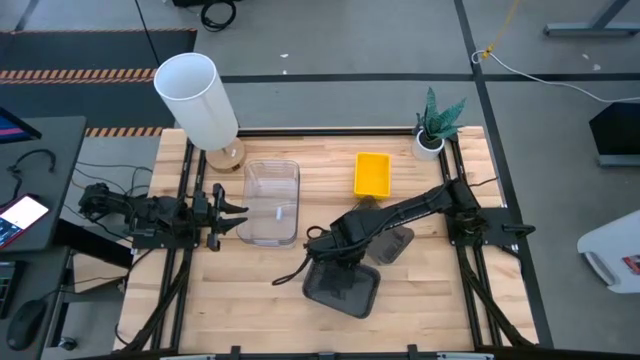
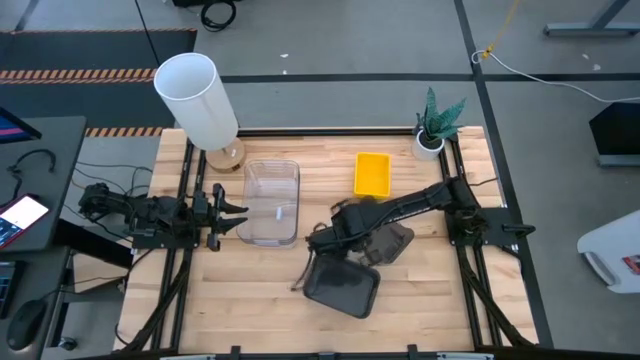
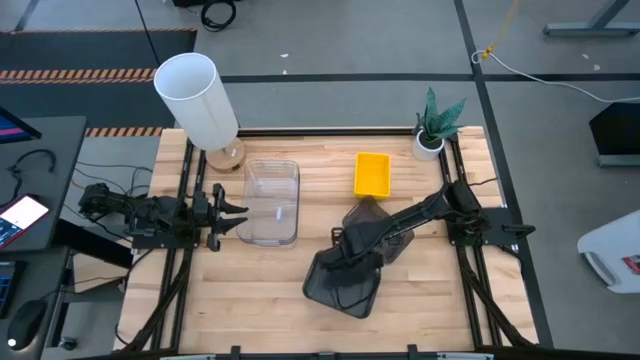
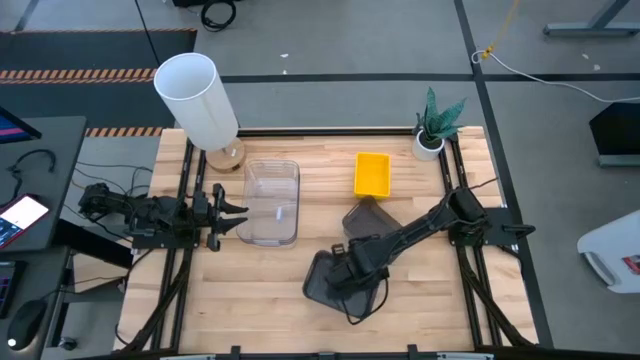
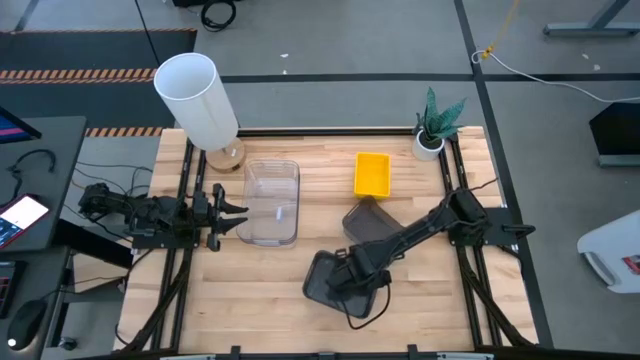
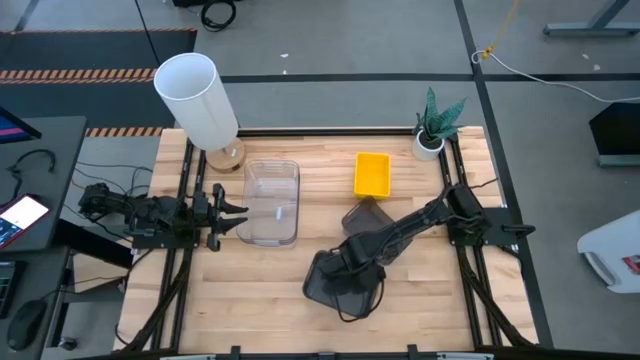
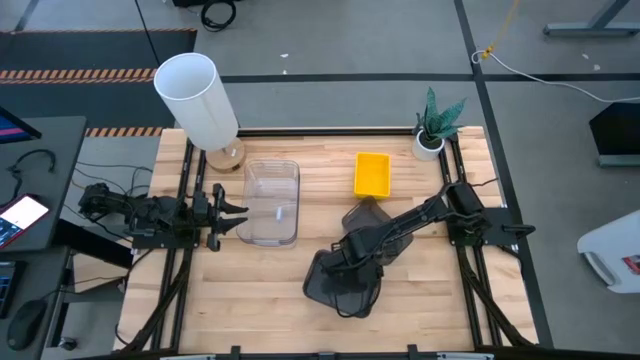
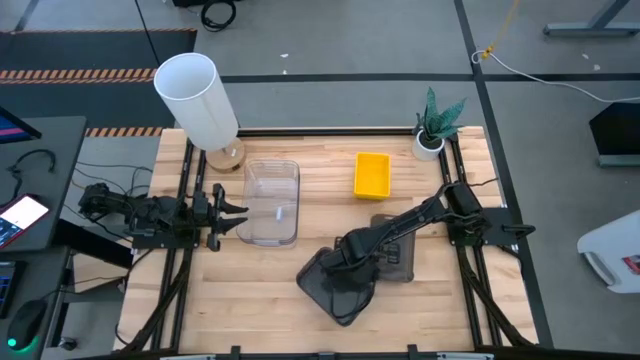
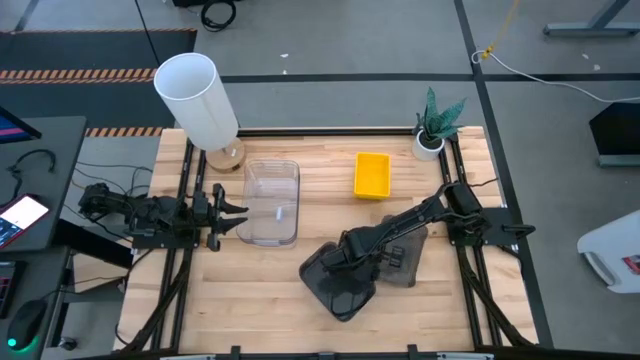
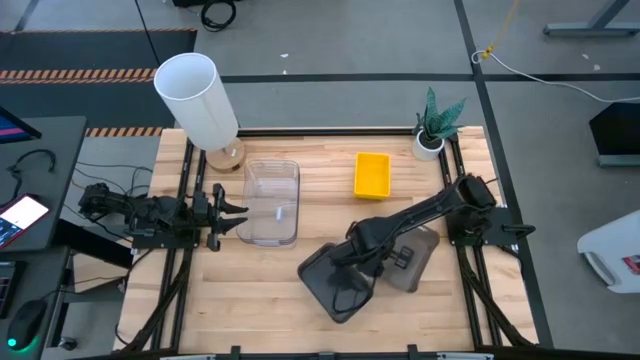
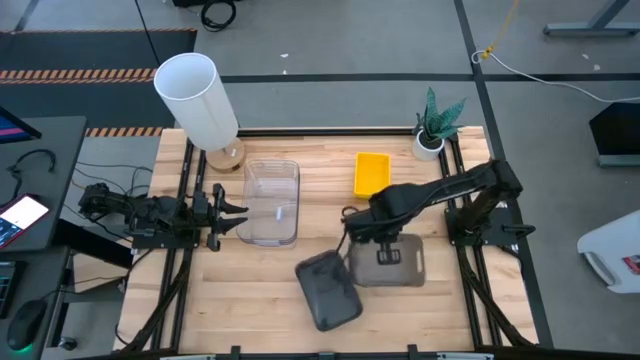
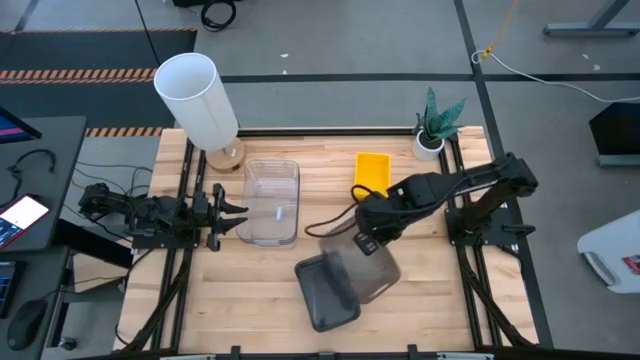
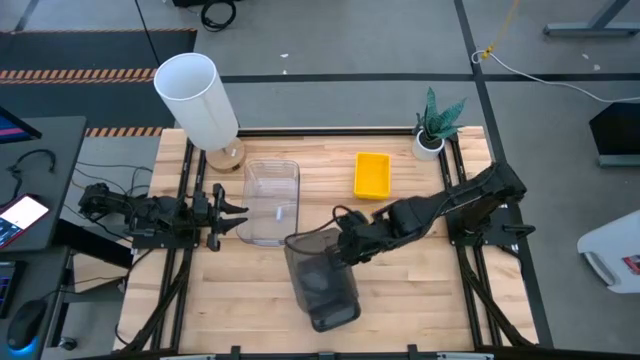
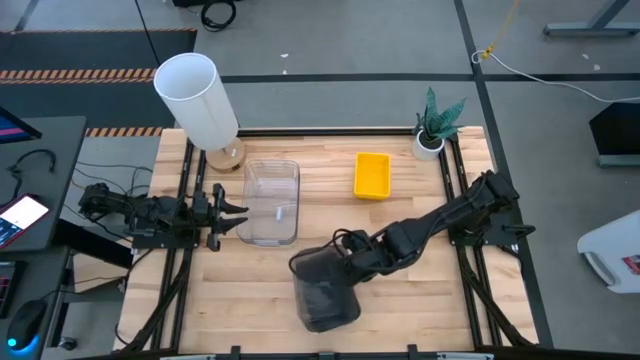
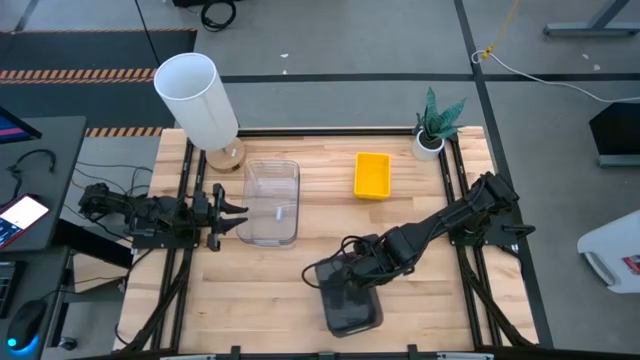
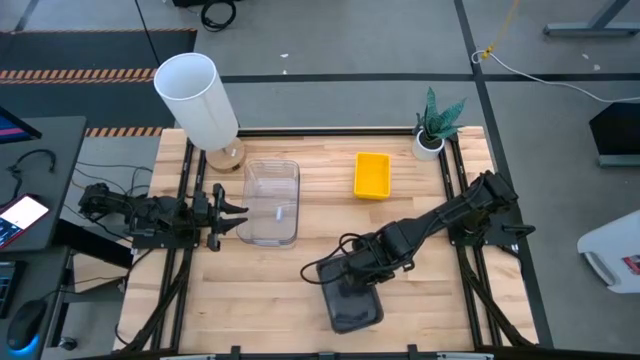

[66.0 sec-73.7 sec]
Stack the top black bin on the bottom black bin

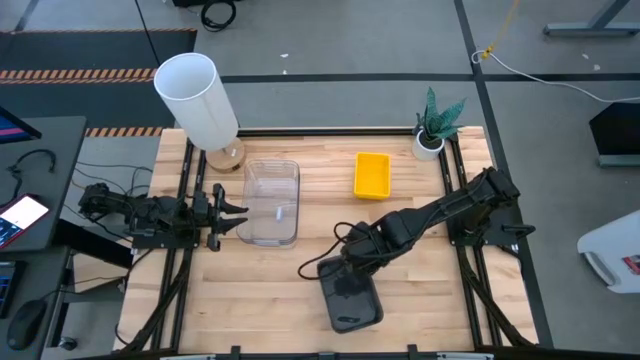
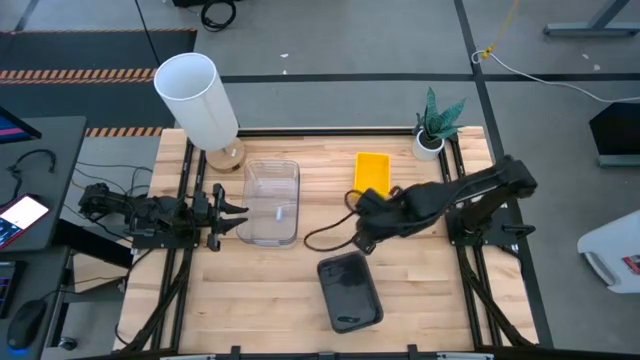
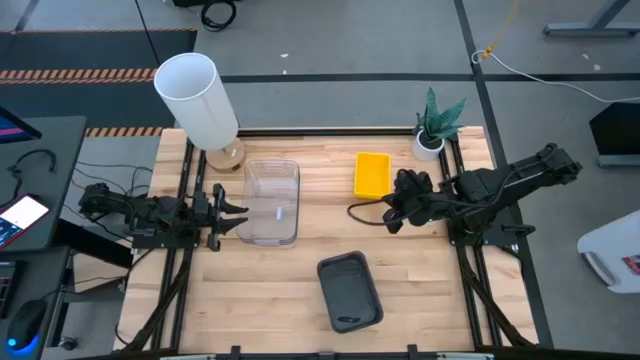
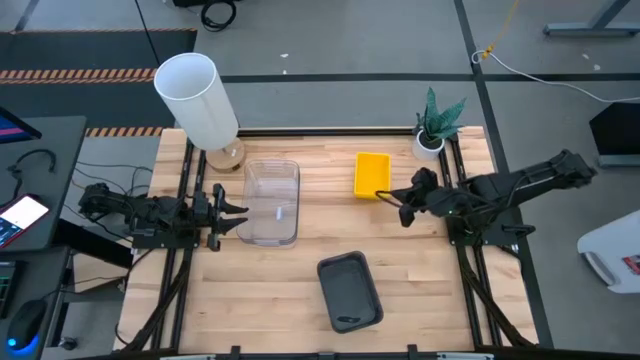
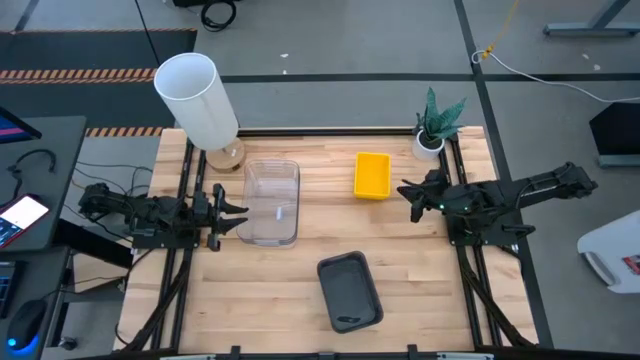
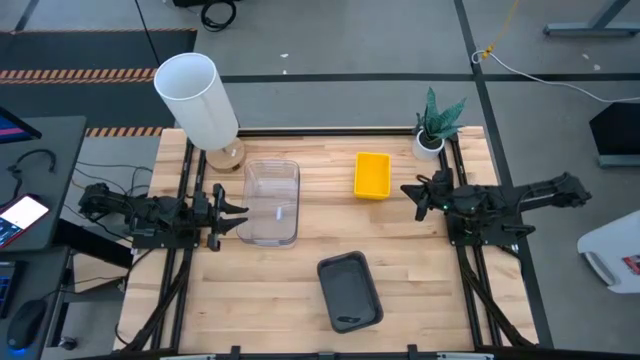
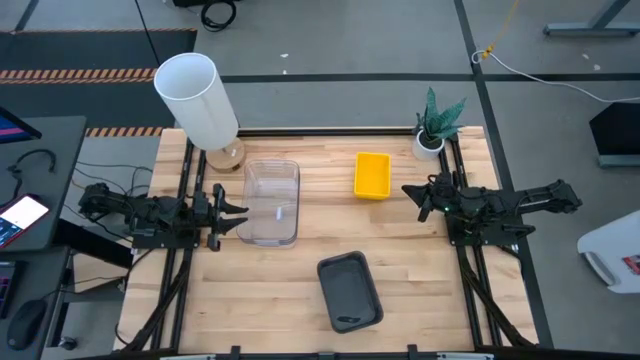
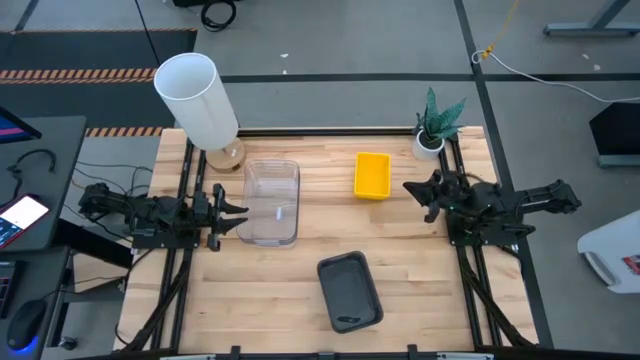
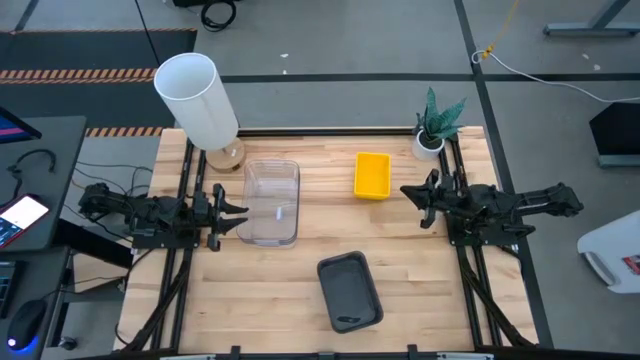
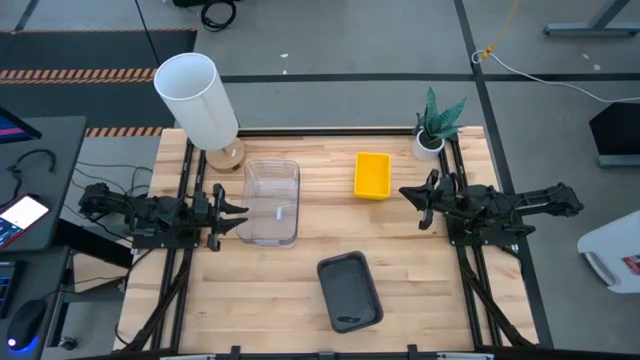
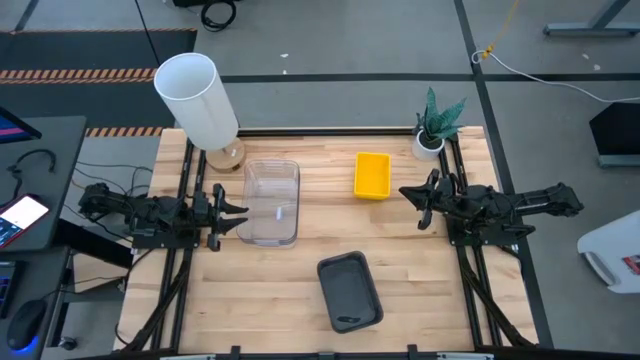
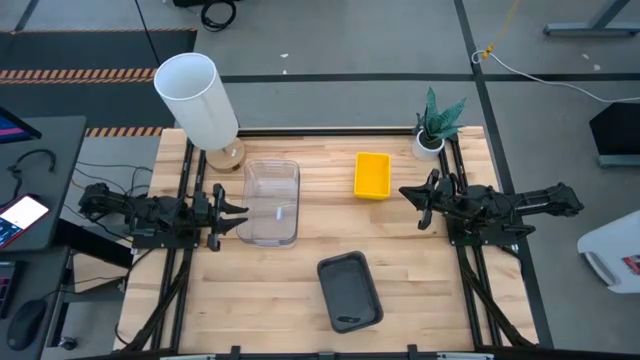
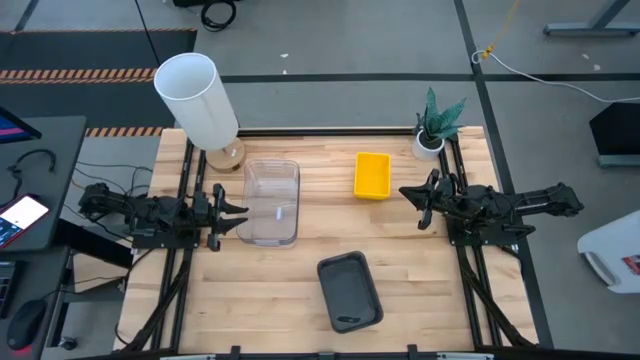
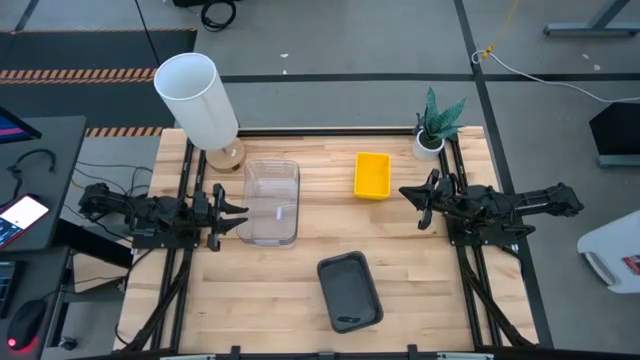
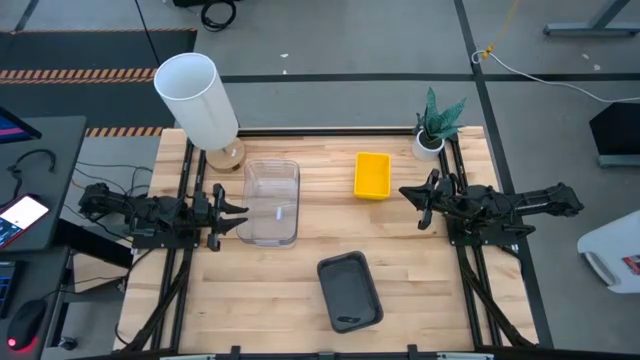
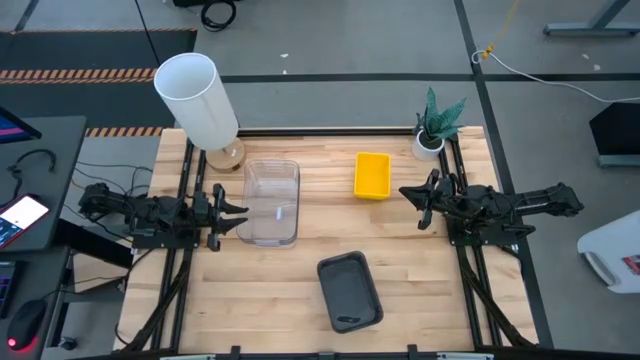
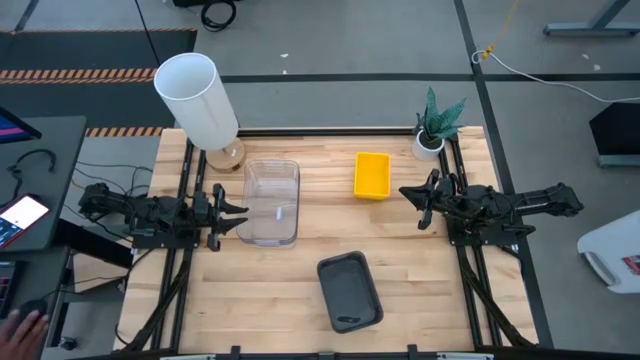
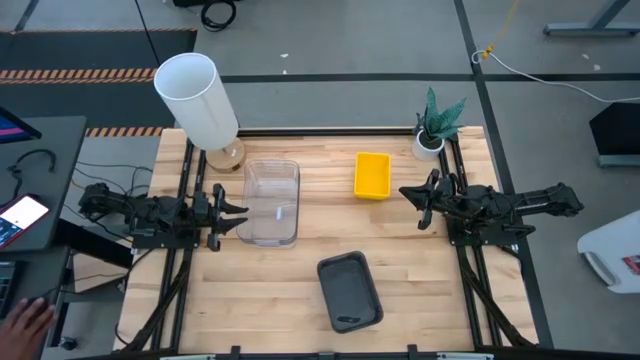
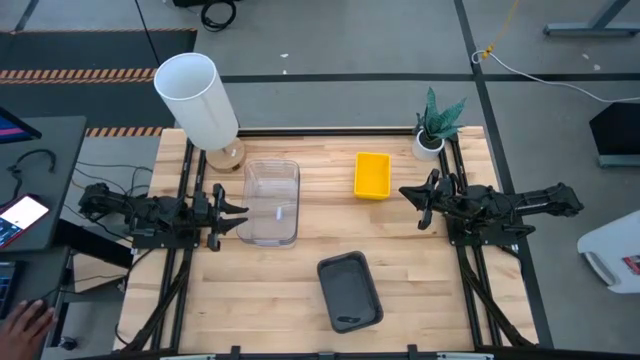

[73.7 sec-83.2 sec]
Return to Home Position
